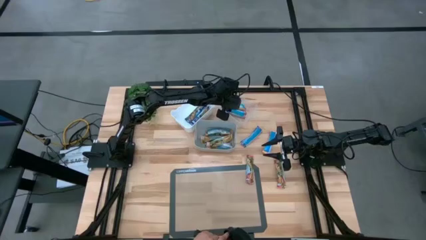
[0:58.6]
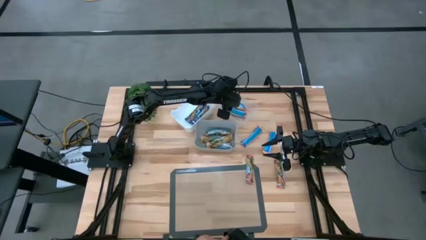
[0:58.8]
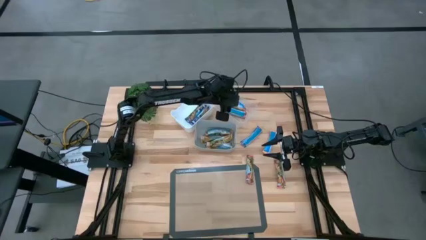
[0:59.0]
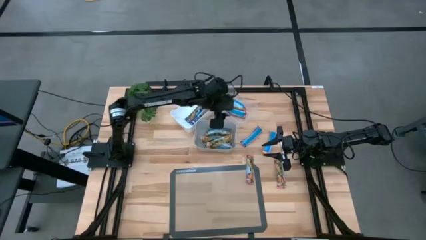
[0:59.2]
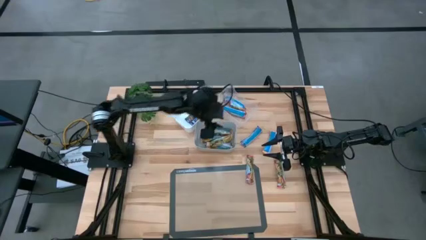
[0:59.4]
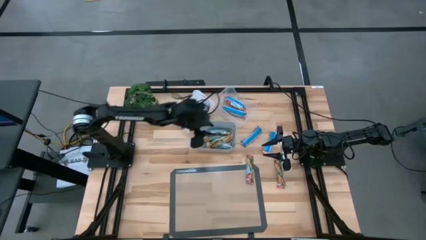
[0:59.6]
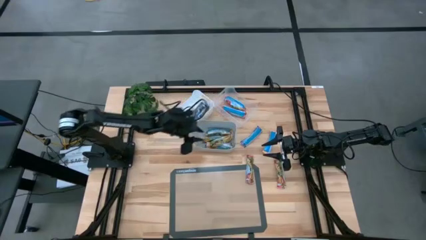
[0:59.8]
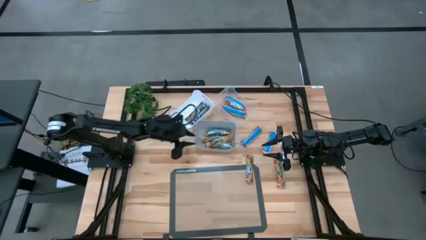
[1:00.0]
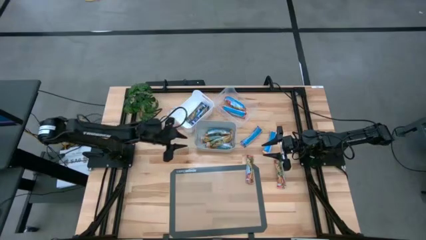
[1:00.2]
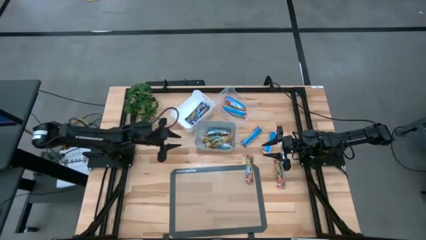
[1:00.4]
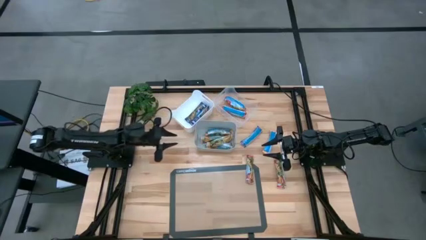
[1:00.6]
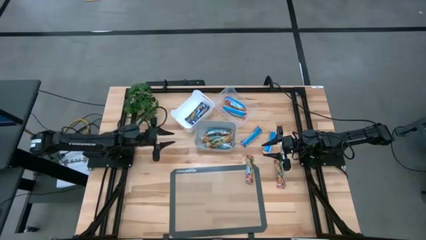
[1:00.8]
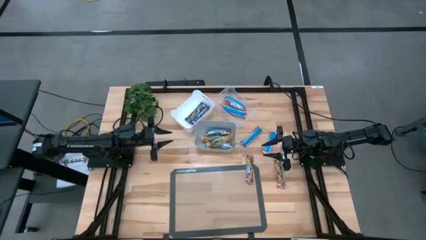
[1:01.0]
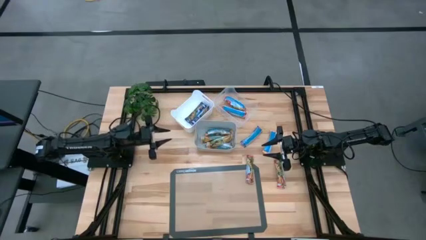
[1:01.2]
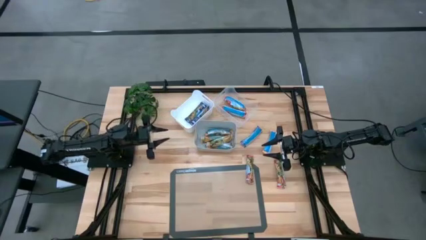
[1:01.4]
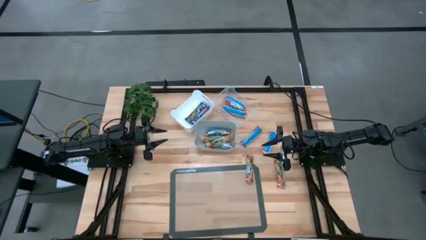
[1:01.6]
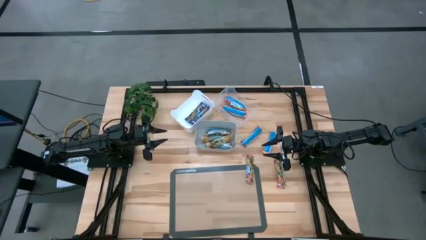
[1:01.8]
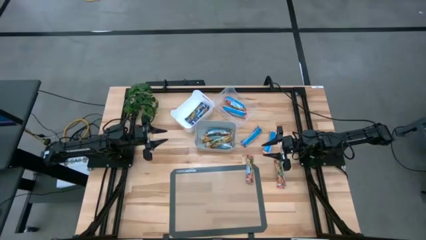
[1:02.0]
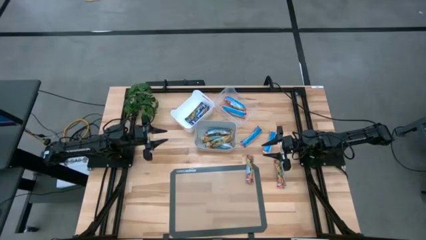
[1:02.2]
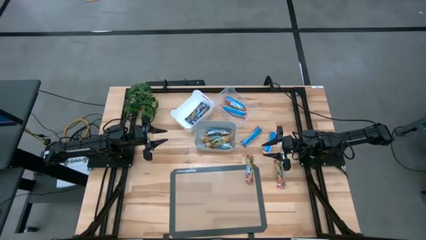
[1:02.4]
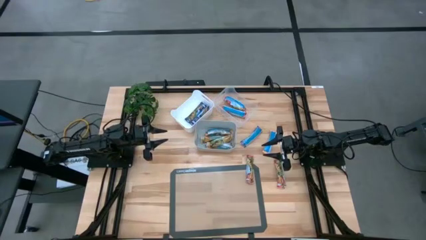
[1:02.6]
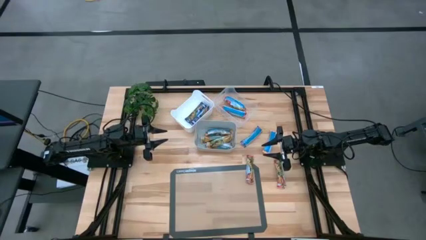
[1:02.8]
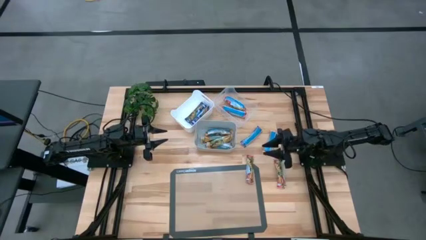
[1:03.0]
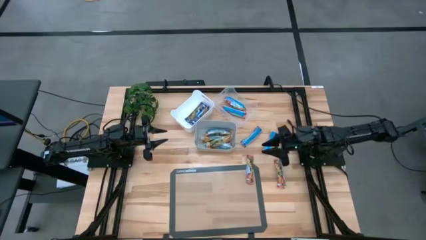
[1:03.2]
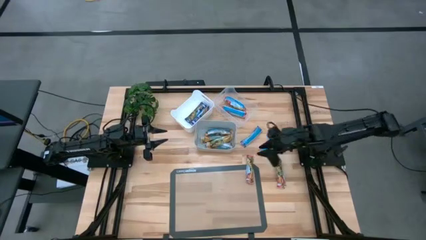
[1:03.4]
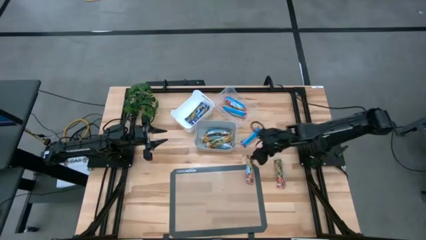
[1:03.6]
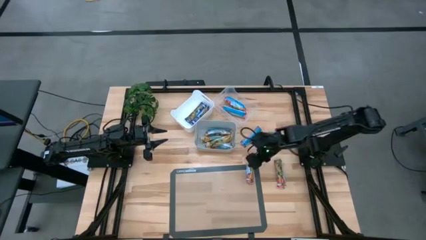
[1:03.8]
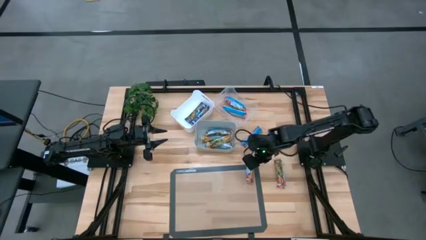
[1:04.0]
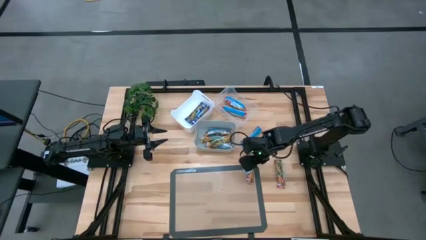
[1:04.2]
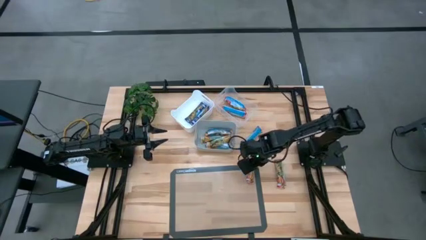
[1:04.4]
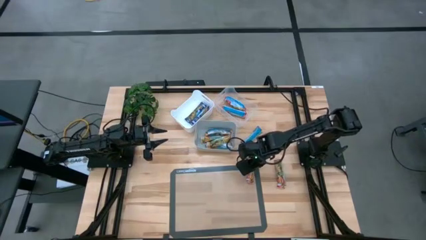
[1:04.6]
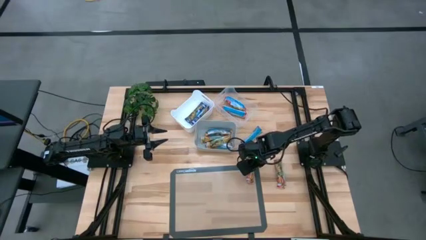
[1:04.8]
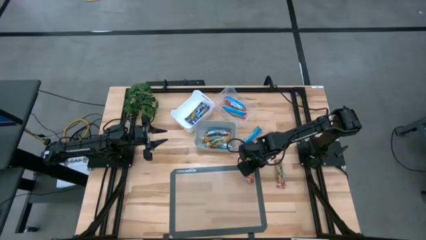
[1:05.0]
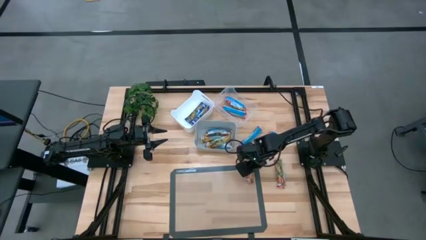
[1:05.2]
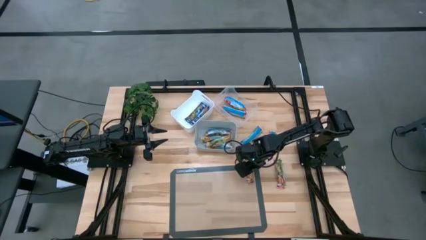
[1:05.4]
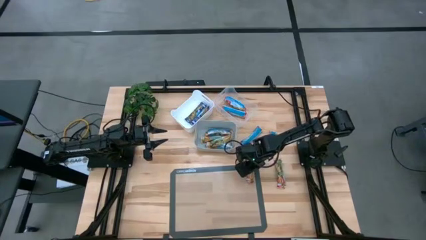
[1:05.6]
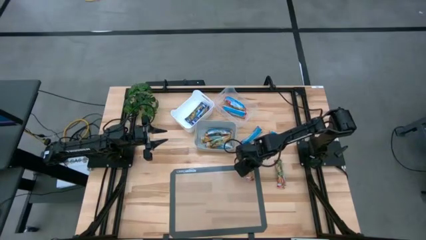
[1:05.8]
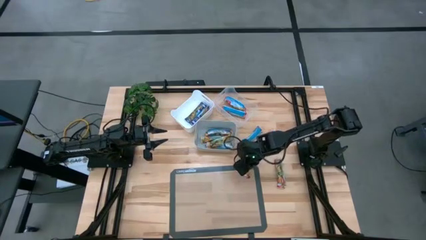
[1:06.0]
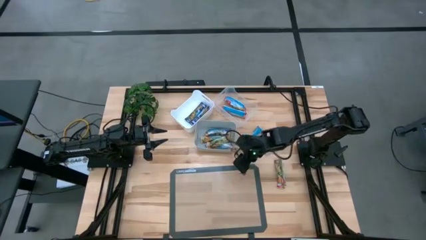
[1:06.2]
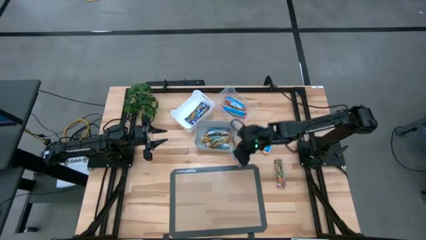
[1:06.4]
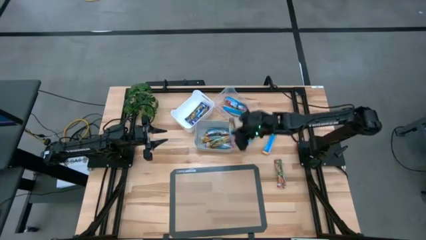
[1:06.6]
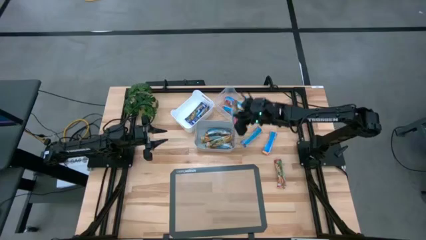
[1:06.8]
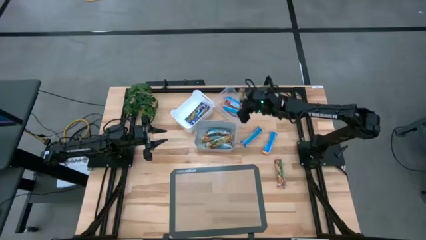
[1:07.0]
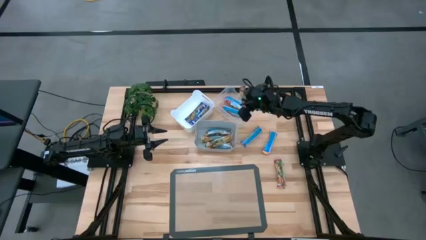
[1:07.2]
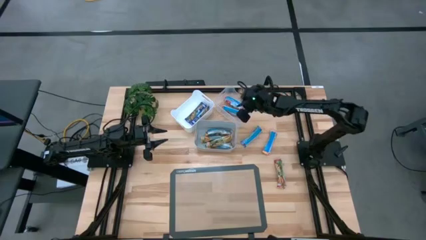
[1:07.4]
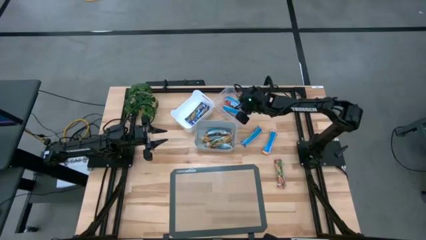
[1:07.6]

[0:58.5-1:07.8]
Task: Pick and place Granola Bars by type
Put the red granola bar into the transparent bin

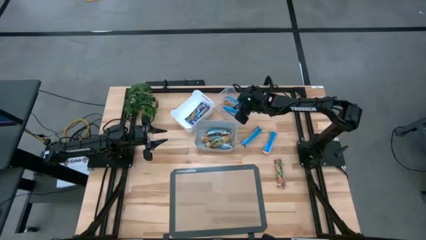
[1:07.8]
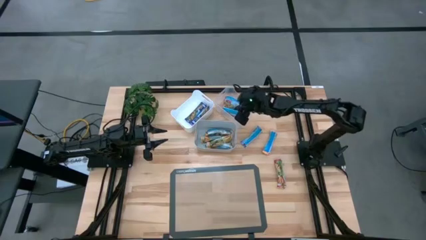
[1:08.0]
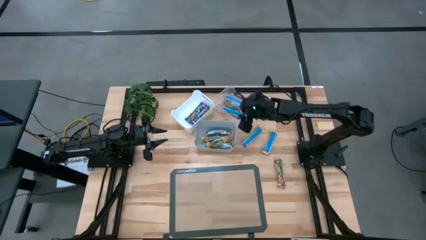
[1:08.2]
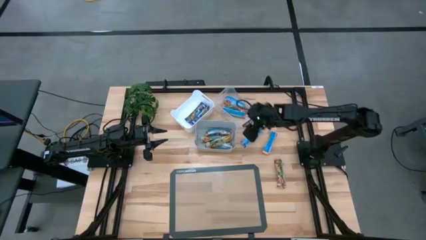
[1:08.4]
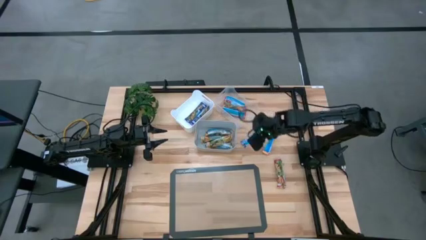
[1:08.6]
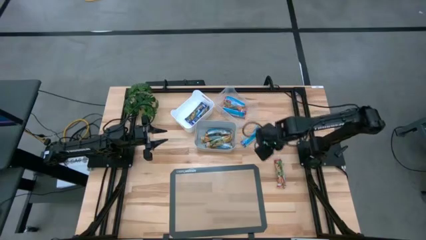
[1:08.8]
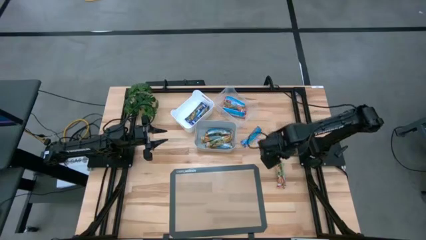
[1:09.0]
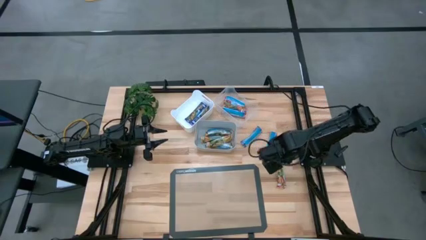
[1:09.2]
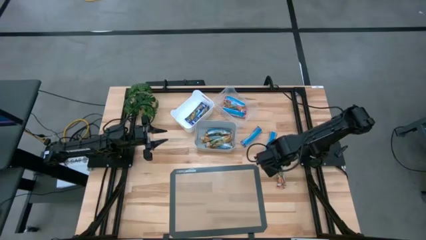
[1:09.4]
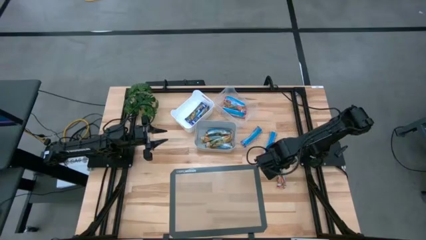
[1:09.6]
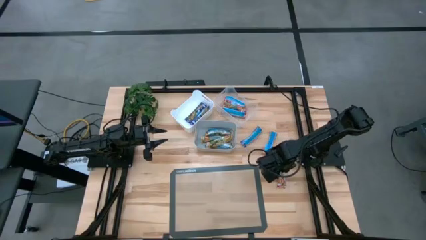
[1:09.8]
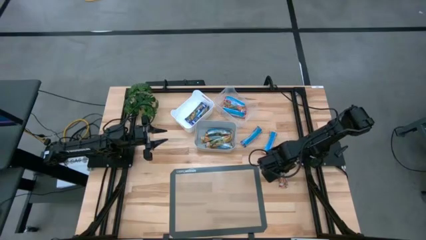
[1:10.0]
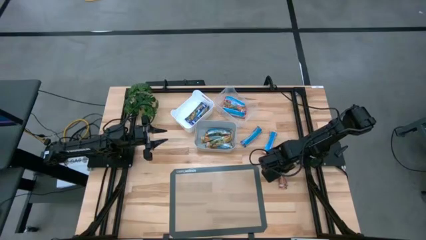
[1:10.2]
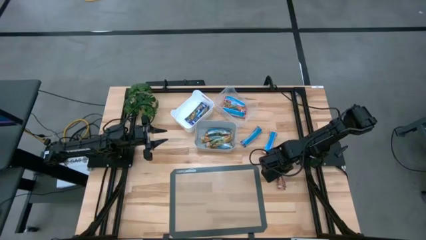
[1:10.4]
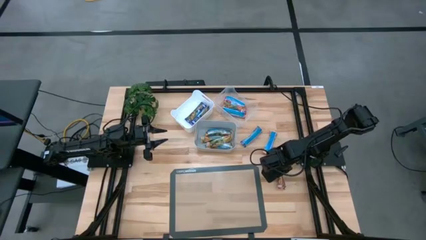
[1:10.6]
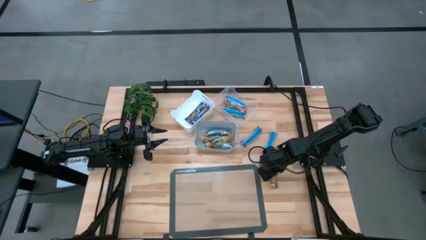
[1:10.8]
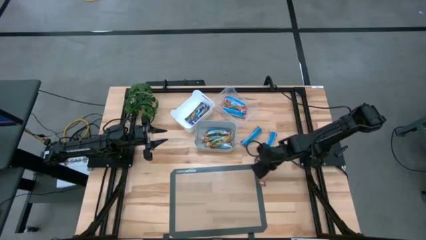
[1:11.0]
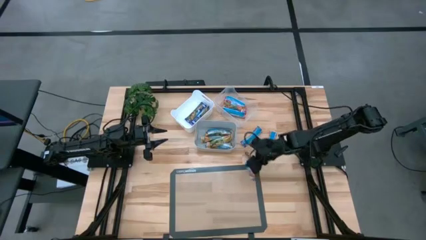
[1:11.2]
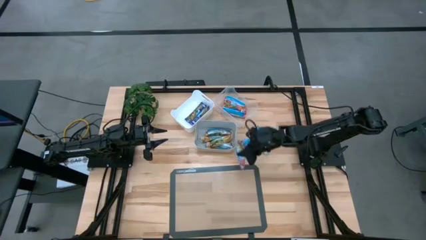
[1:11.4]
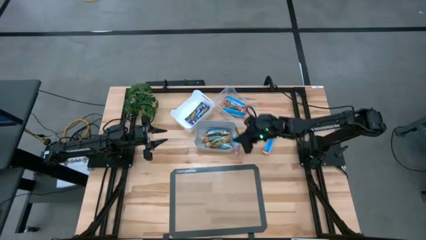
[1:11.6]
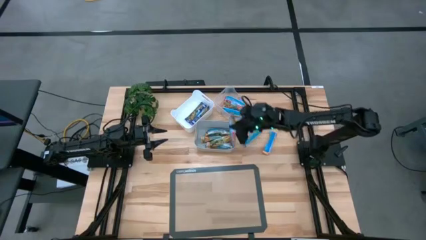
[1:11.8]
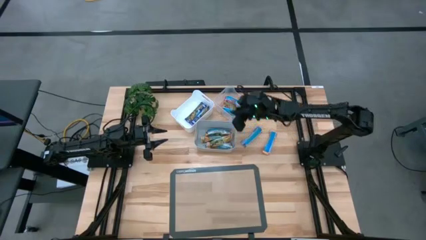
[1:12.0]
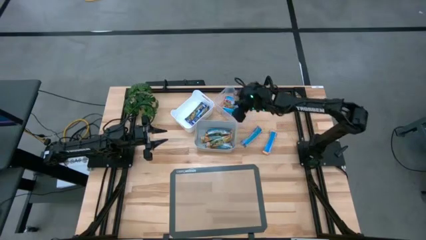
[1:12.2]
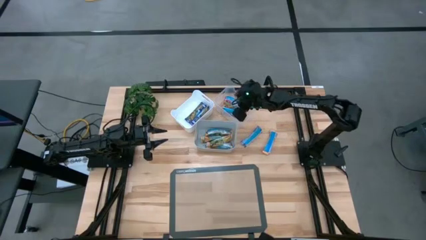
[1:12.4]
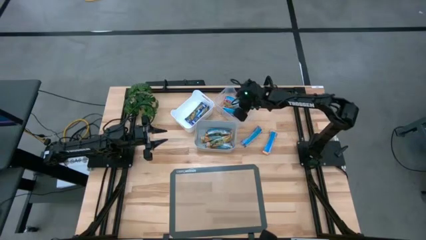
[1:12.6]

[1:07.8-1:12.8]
Put the red granola bar into the transparent bin

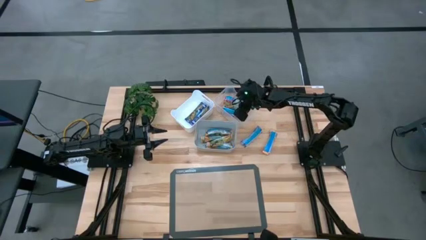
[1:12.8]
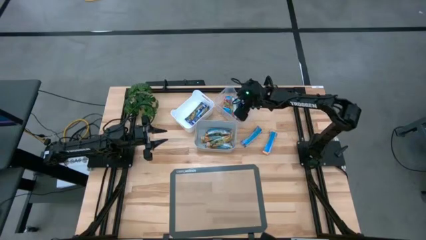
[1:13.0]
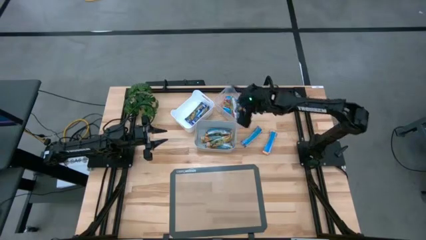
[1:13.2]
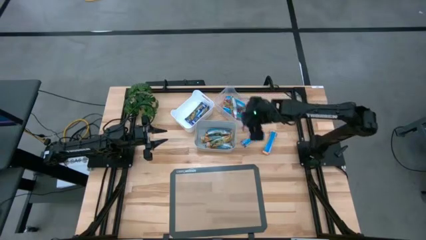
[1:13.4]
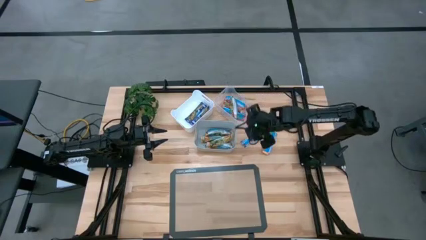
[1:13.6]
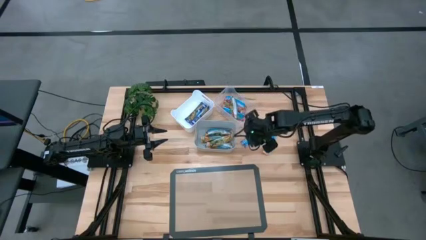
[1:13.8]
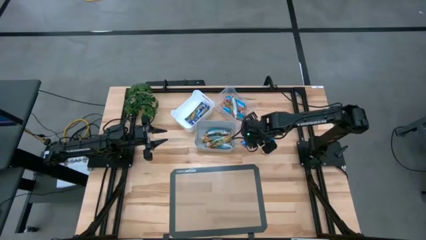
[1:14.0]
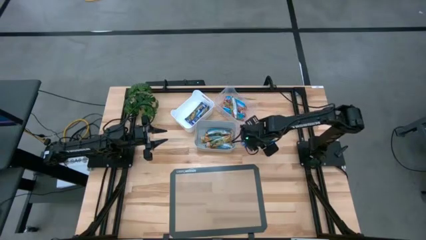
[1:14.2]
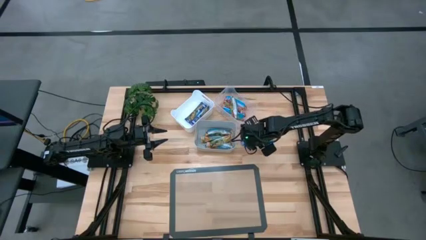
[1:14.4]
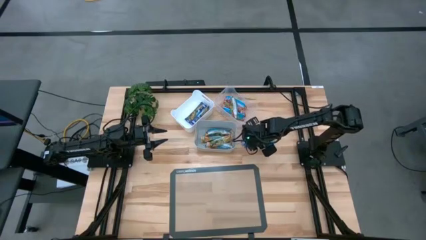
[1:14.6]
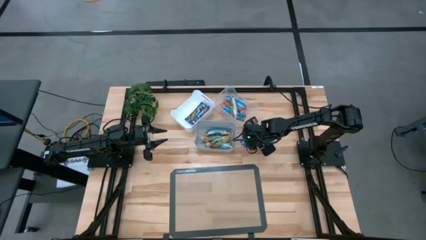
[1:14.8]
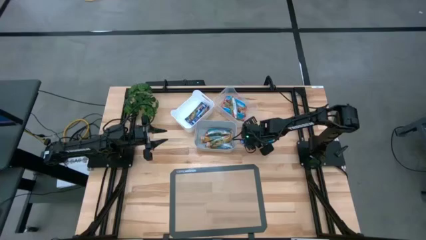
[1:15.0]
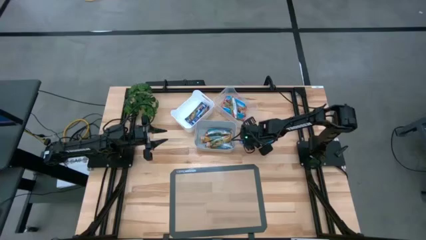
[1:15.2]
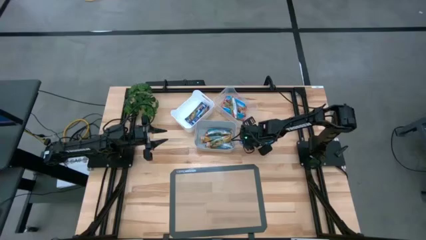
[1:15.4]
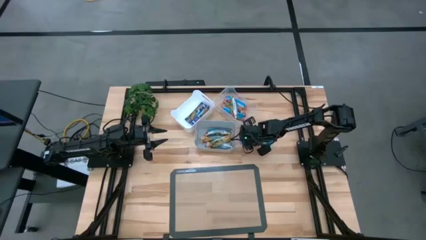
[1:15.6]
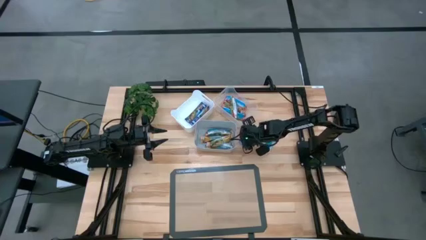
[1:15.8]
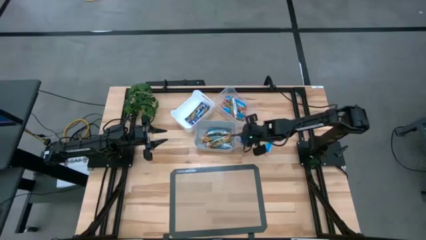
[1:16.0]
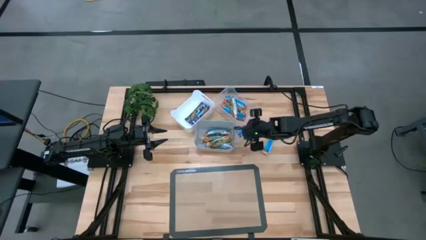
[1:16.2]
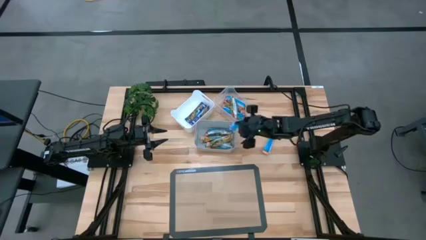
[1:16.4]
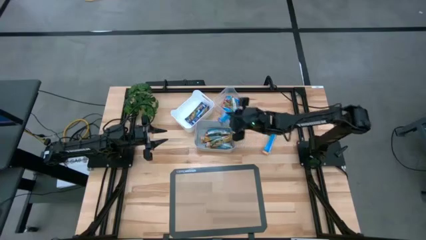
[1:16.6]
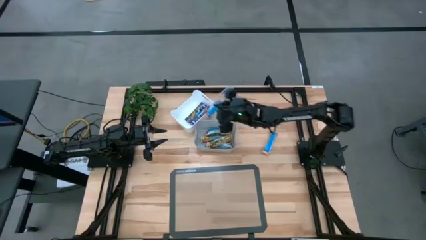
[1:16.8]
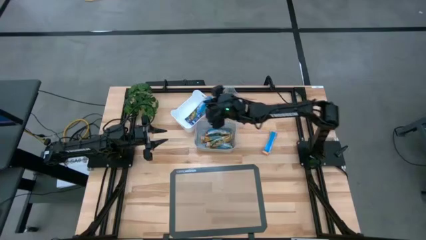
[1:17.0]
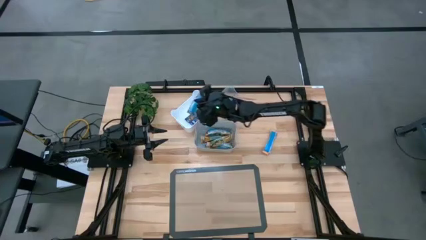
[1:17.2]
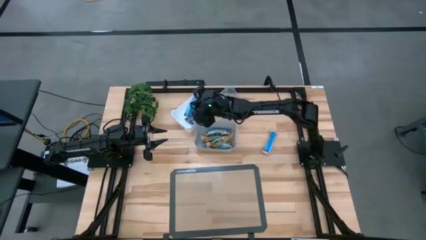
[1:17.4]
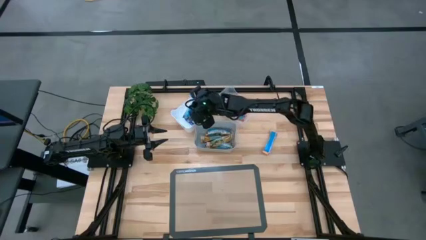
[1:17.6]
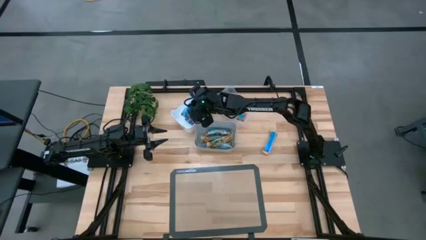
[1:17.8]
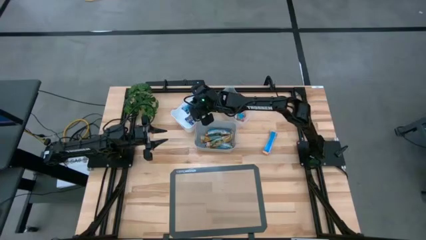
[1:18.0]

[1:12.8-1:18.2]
Put the blue granola bar into the white bin
